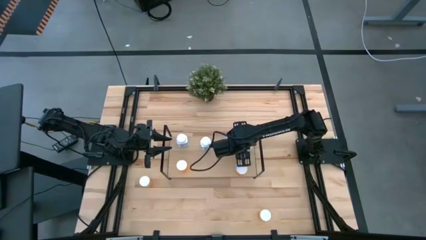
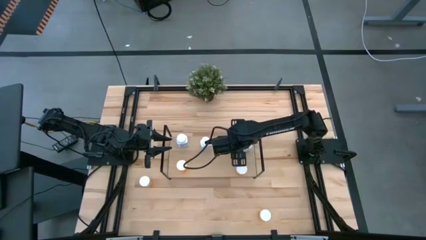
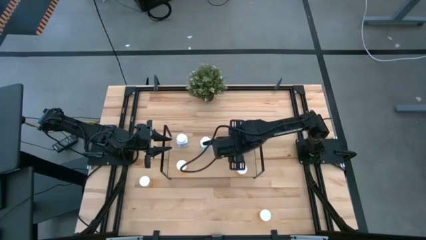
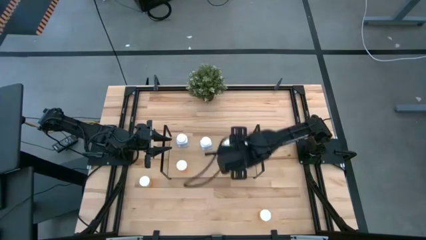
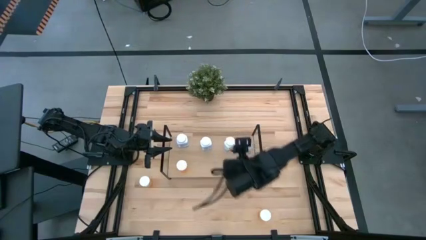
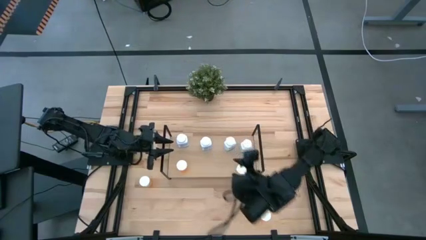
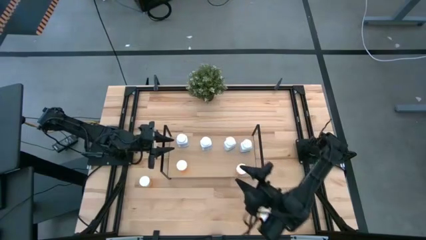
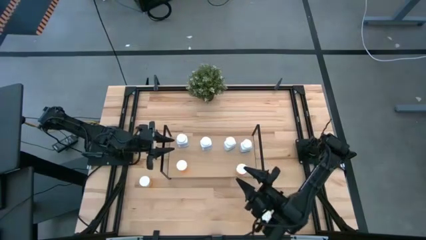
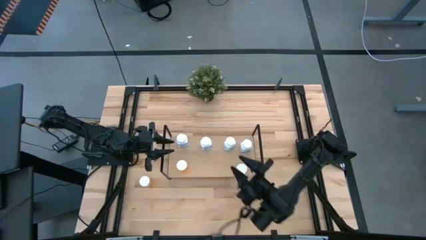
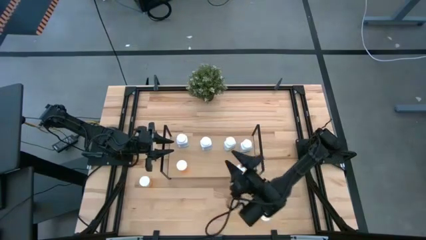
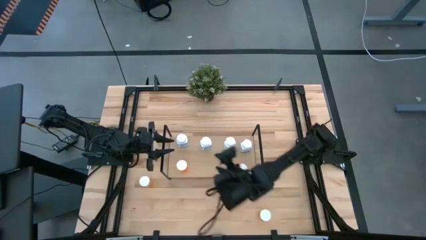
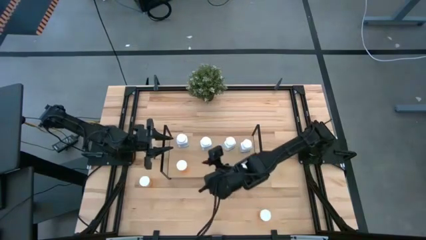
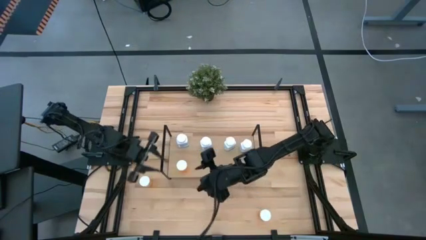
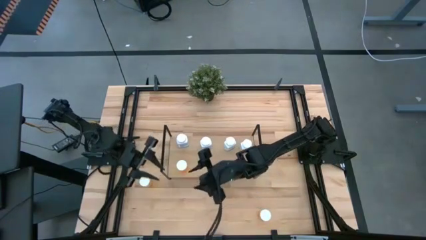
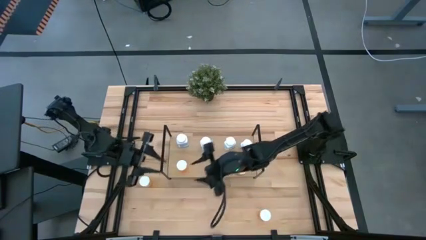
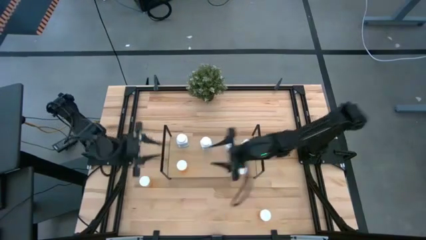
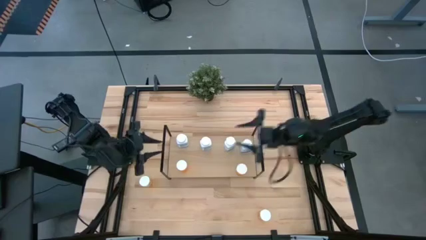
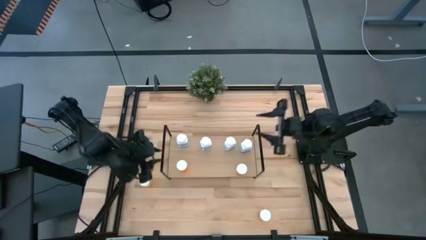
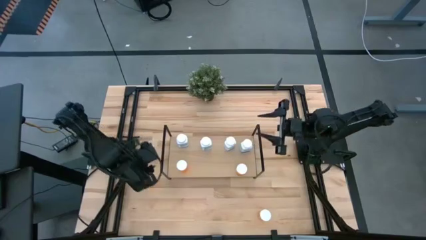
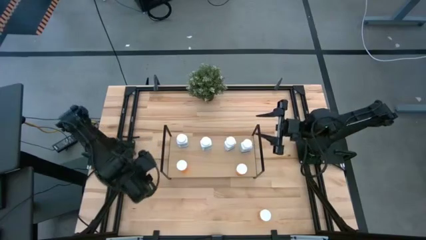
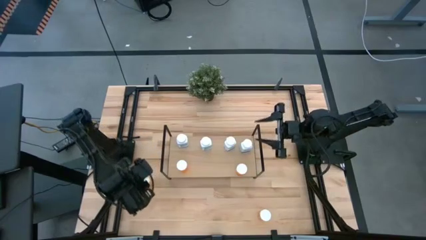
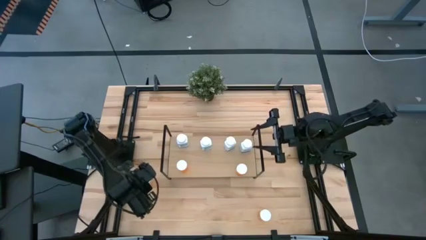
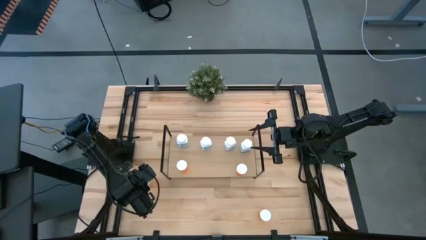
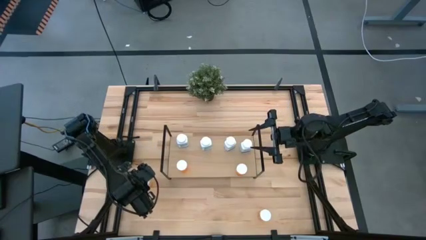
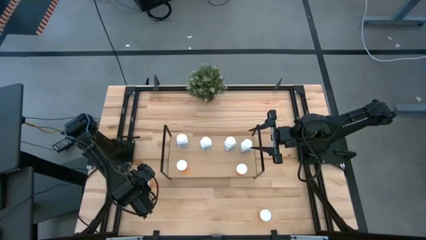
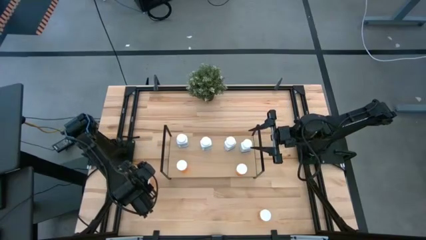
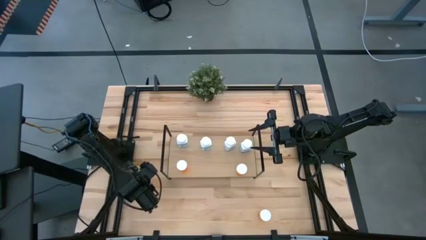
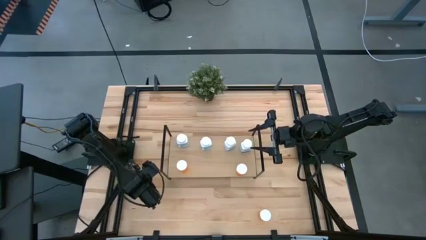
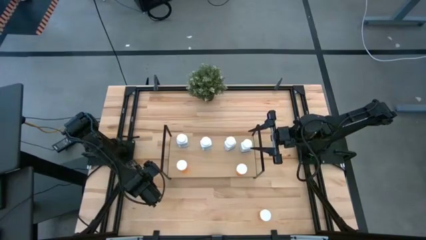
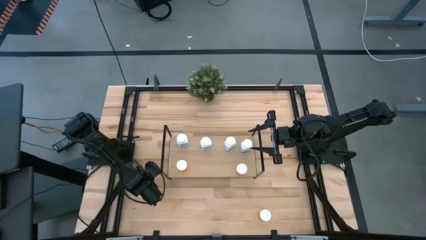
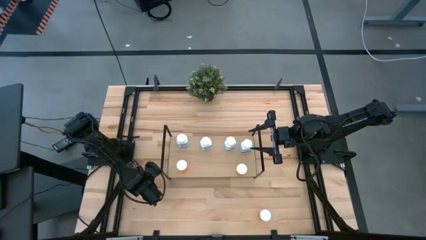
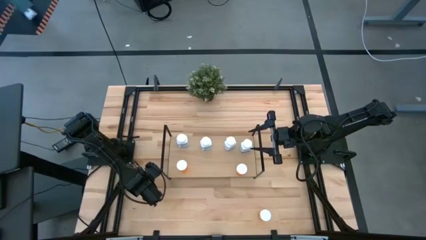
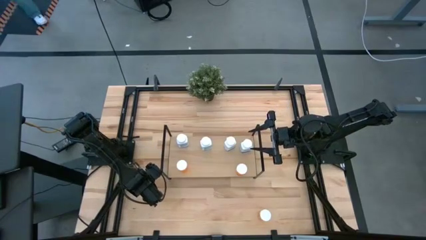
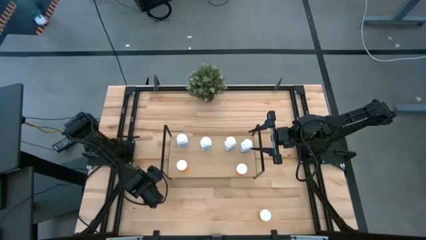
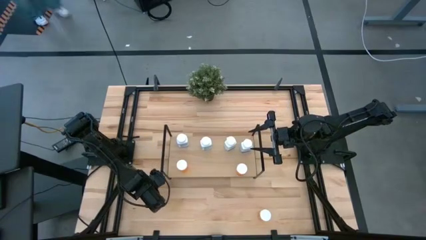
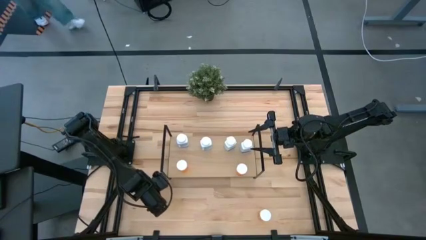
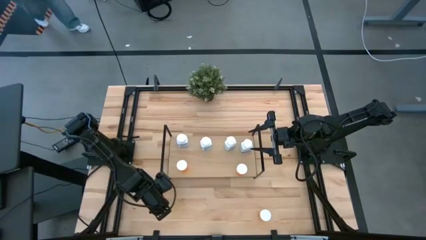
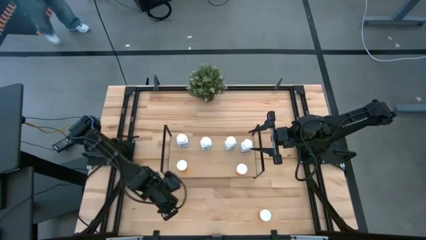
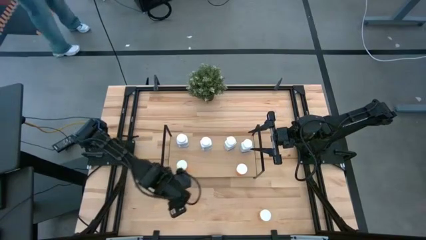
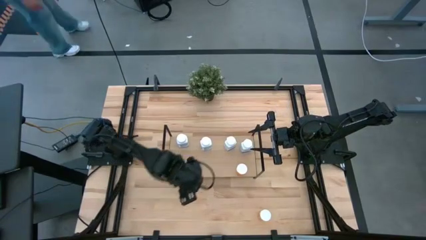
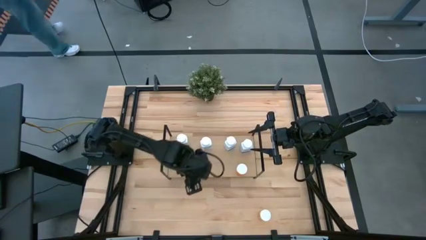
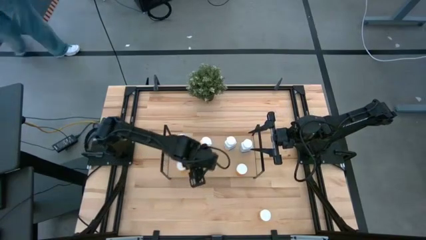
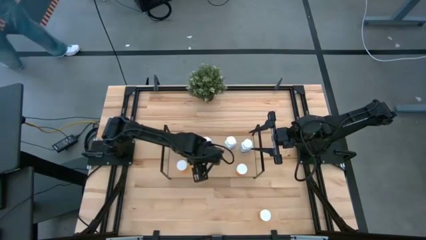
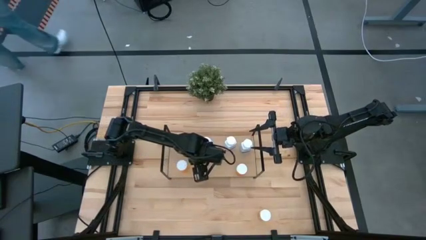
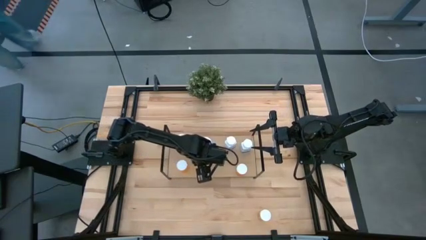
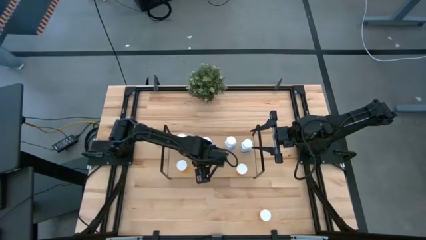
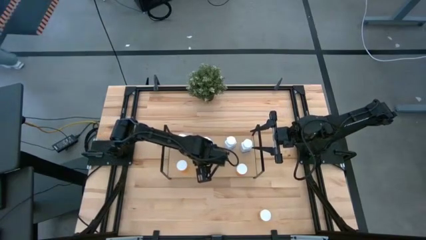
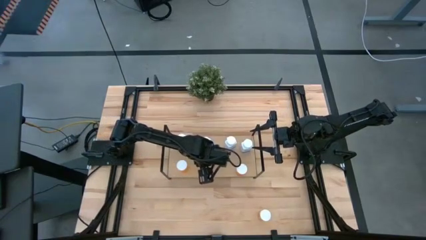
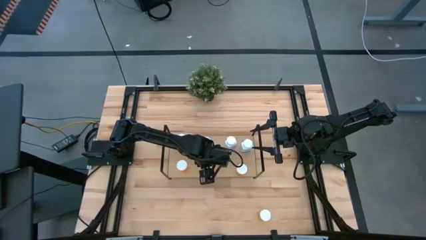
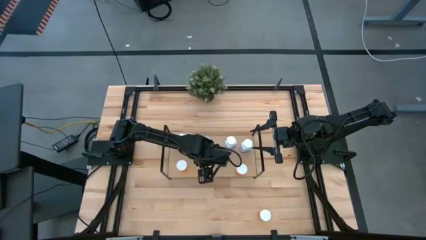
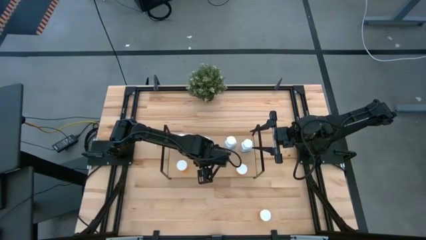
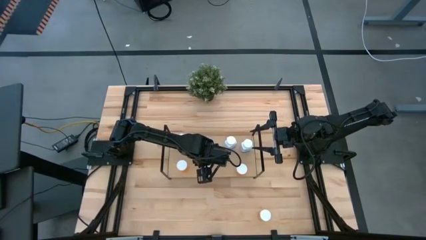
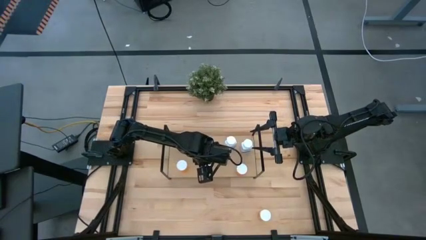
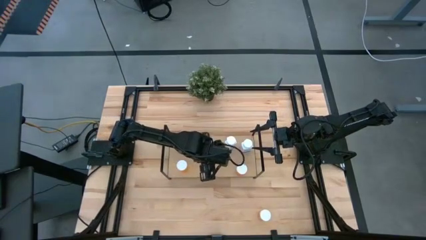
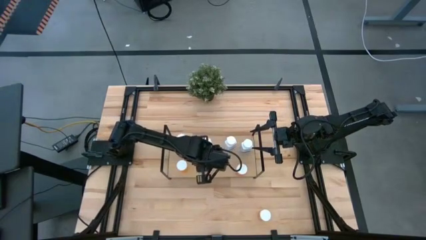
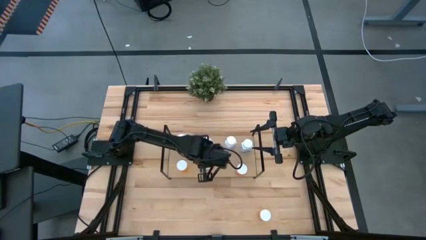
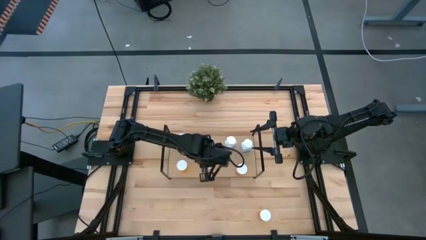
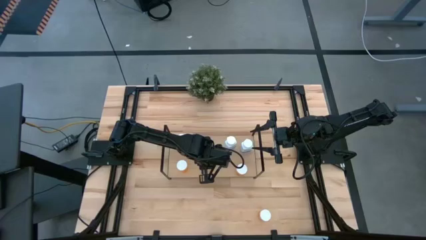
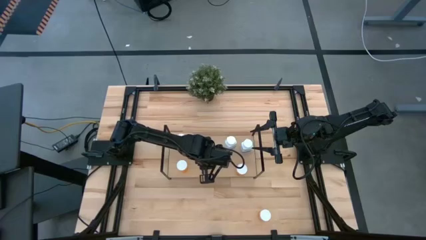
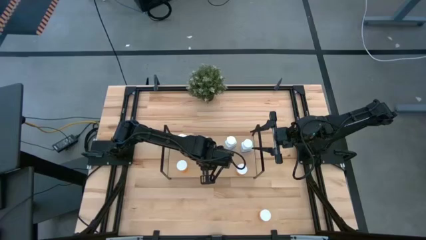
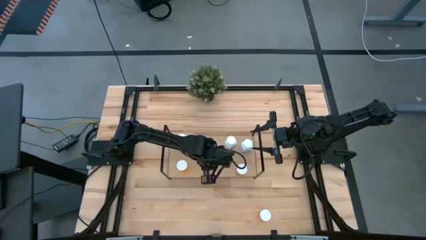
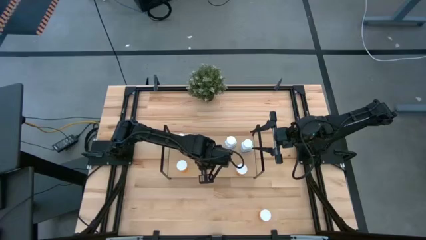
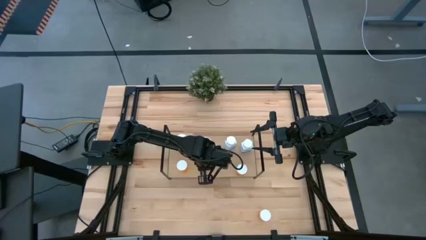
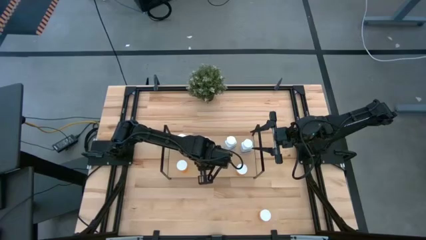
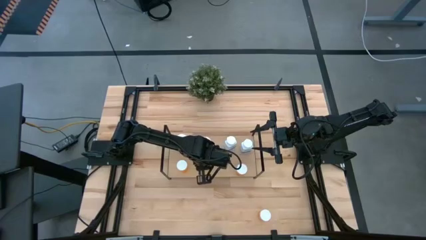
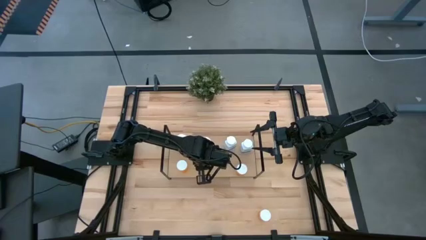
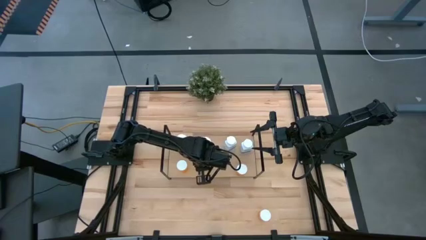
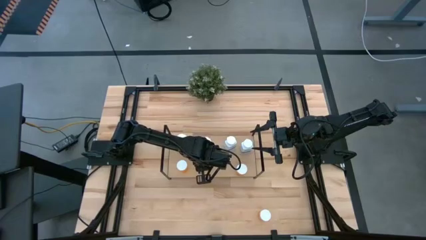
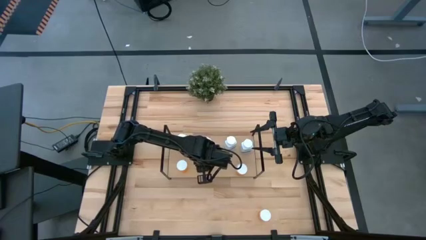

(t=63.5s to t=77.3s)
Task: Pick and place medicine bottles onto shelf by color
Put the left orange pill bottle on the shelf
